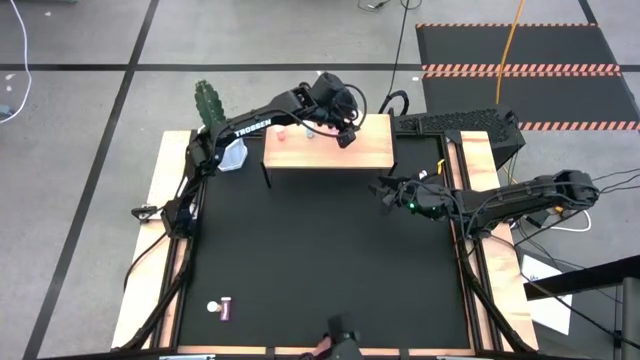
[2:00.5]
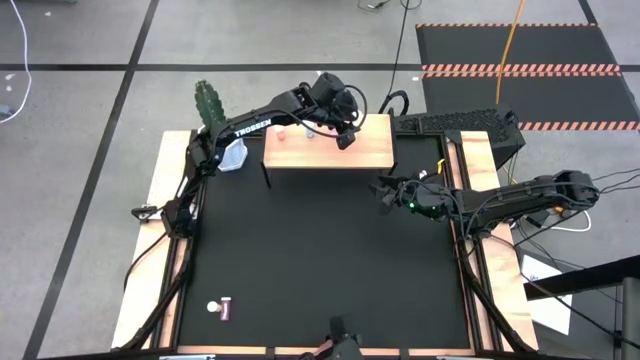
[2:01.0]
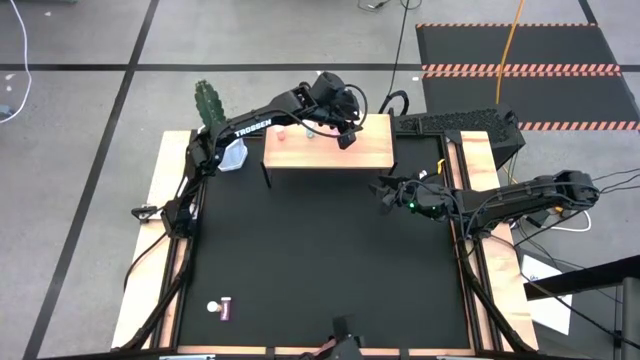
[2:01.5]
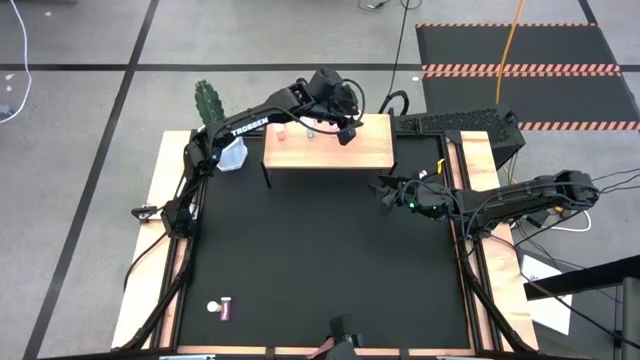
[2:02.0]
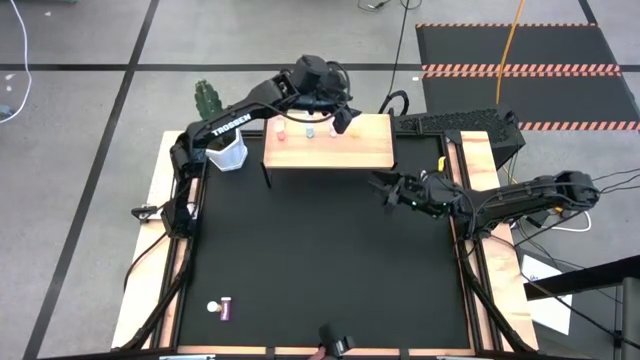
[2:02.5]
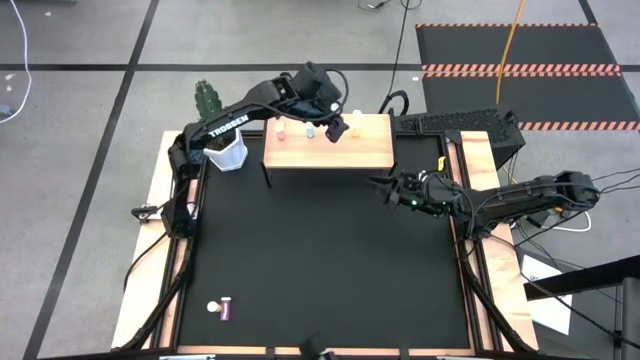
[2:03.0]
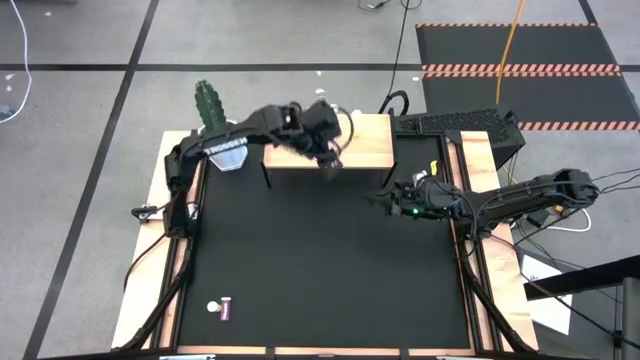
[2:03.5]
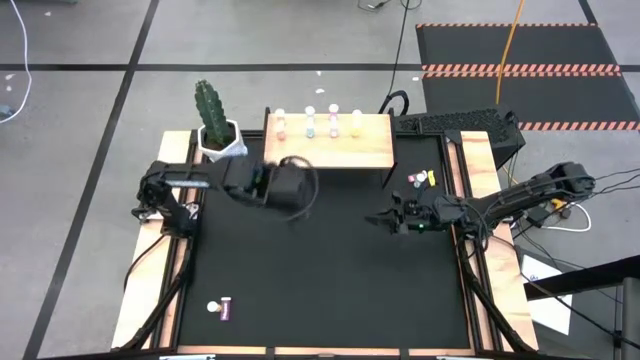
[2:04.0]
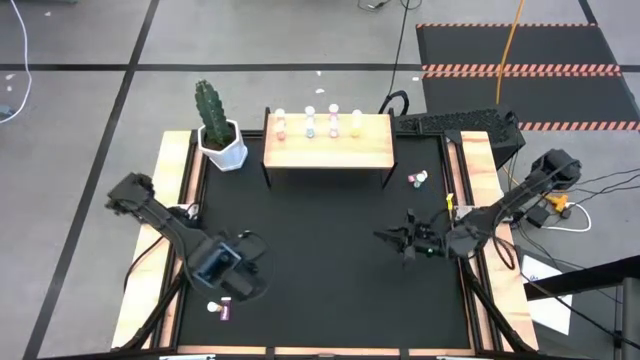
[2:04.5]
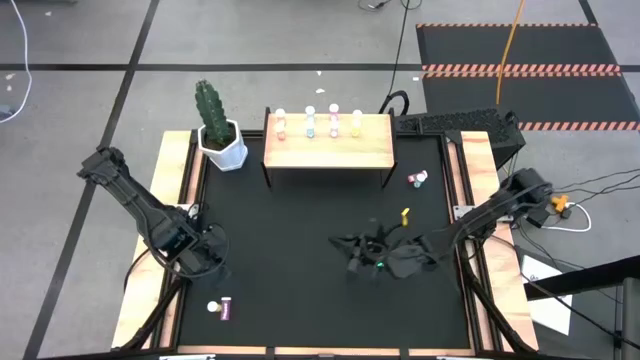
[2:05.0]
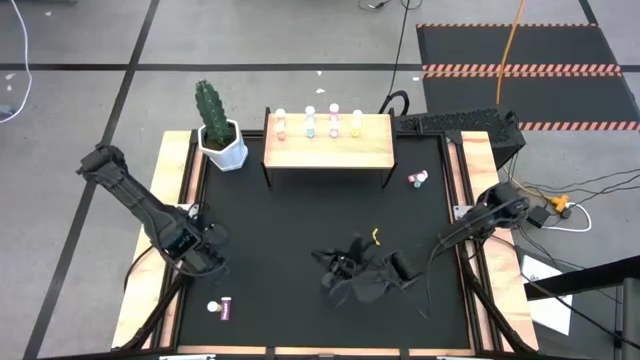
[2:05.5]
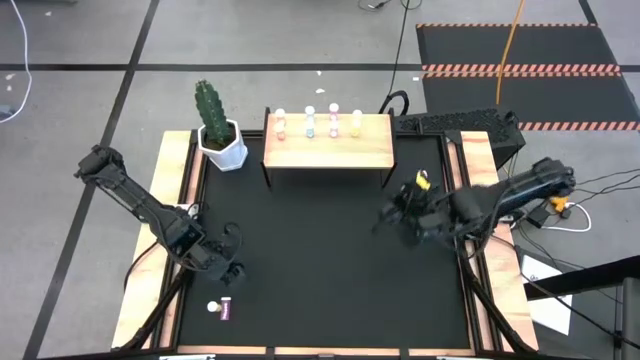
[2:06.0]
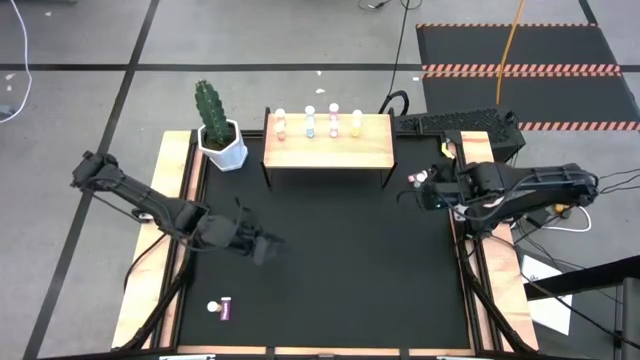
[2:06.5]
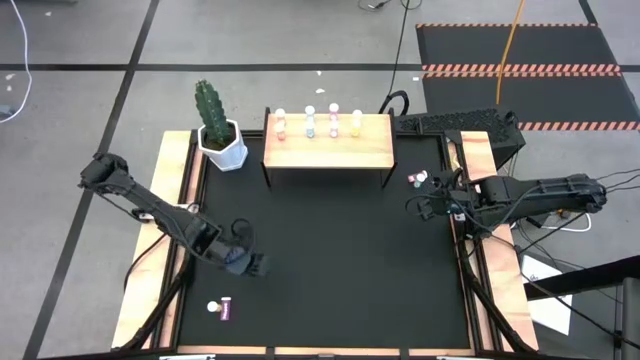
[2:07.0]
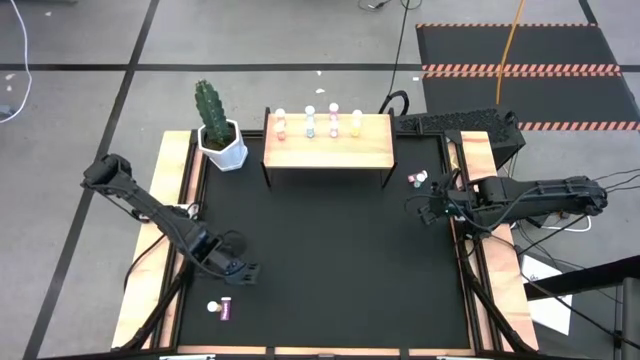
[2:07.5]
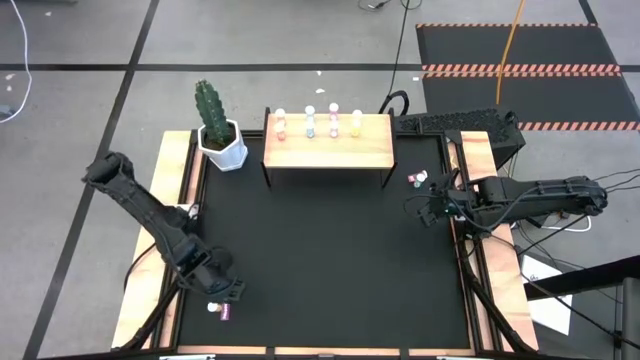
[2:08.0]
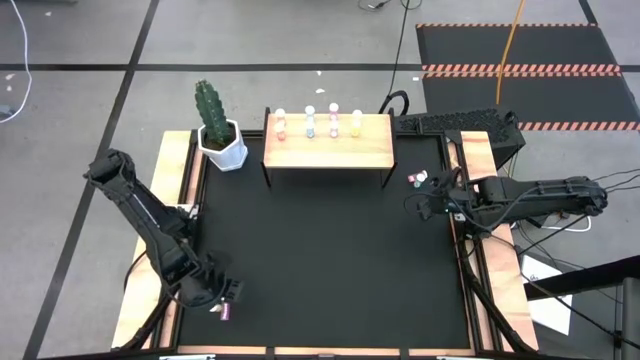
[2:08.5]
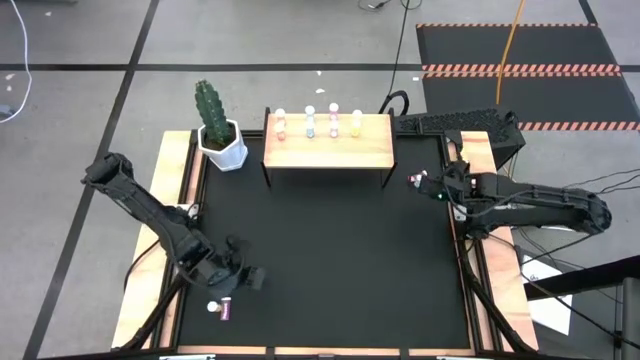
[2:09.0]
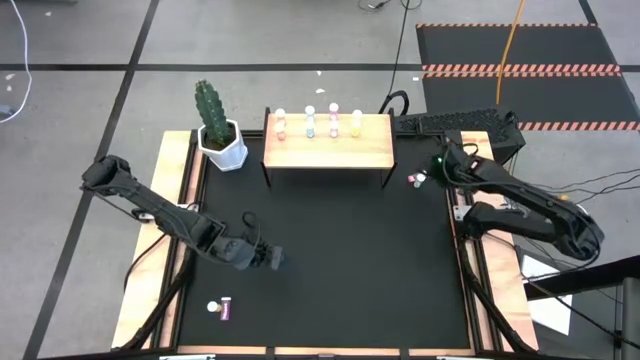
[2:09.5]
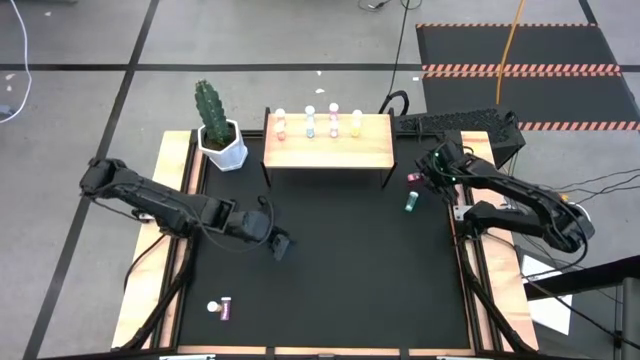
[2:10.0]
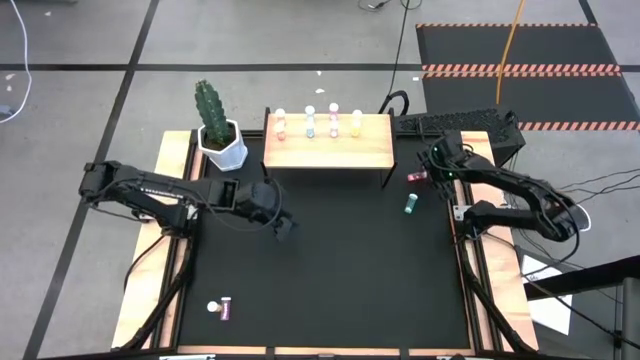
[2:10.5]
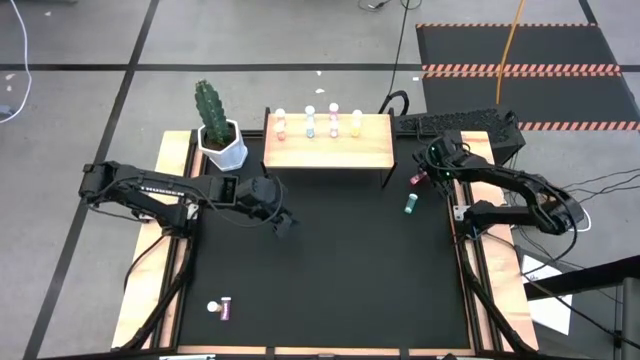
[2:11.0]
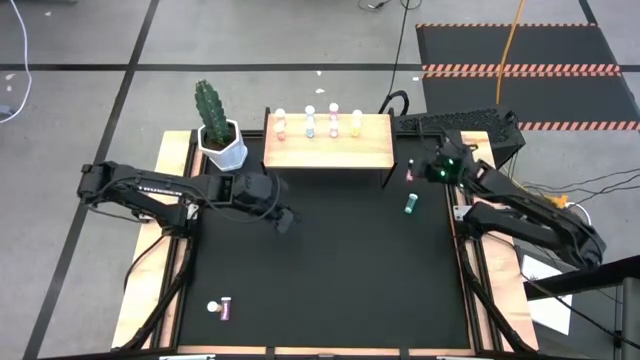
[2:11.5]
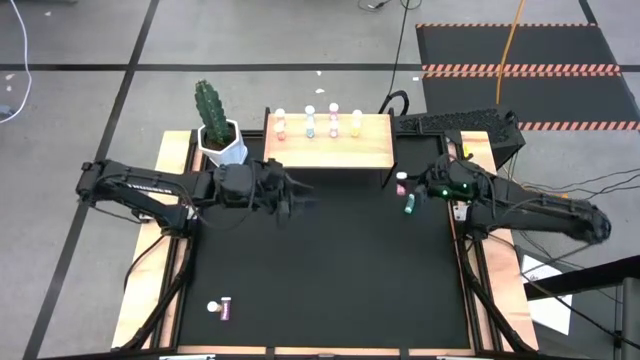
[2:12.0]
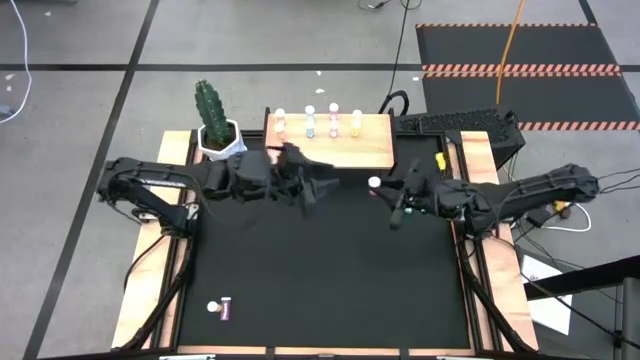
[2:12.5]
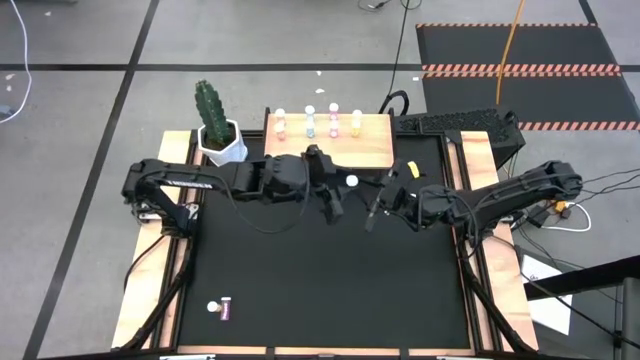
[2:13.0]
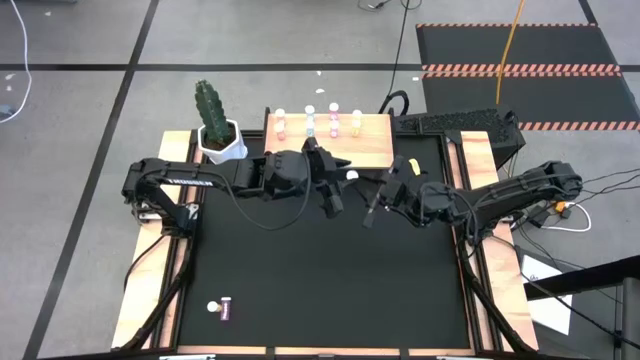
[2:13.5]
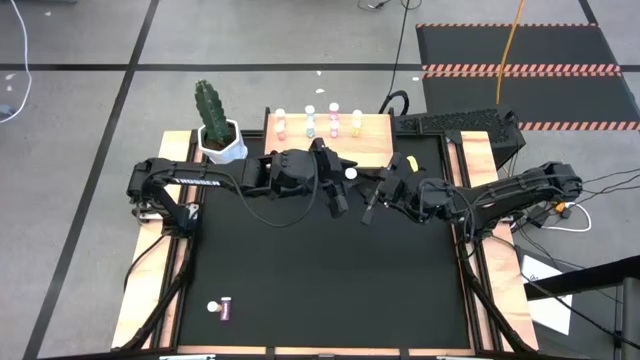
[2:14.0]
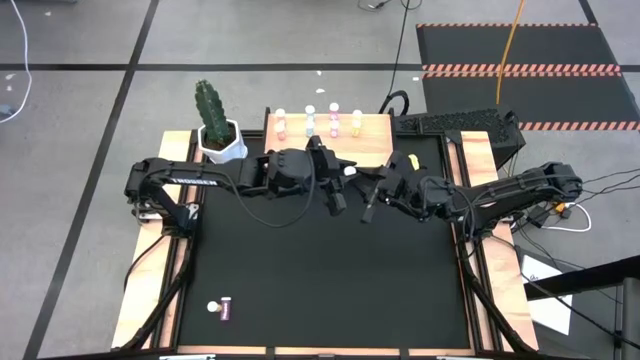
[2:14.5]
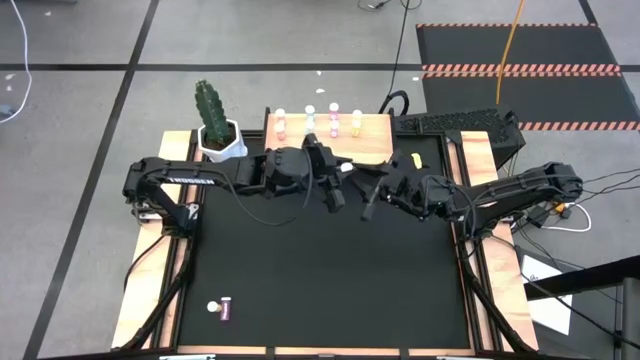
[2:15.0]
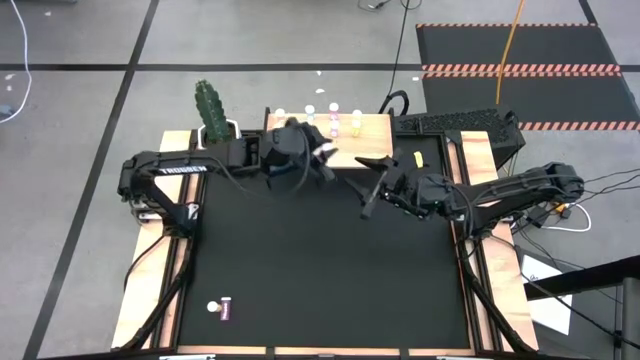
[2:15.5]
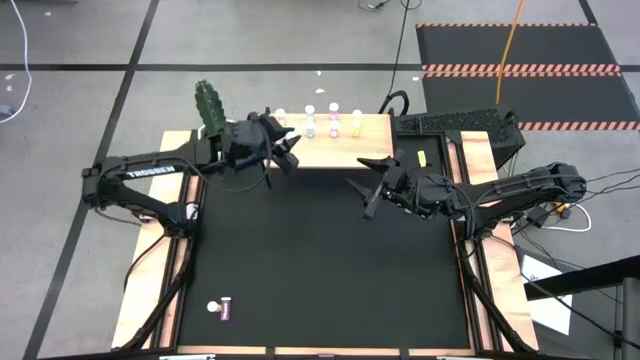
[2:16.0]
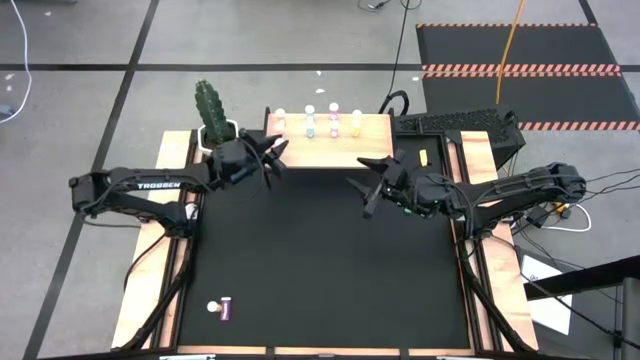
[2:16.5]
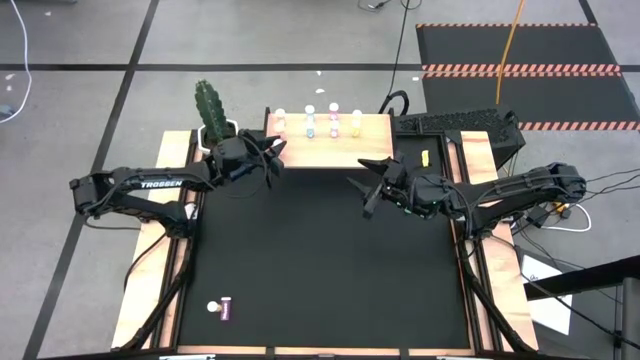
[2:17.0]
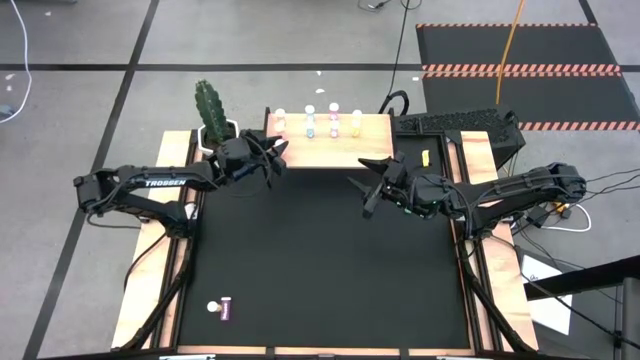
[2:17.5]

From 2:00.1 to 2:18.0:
Task: Pick and place medicine bottles onto shelf by color
Put the orange pill bottle aligned with the other orange pill bottles on the shelf

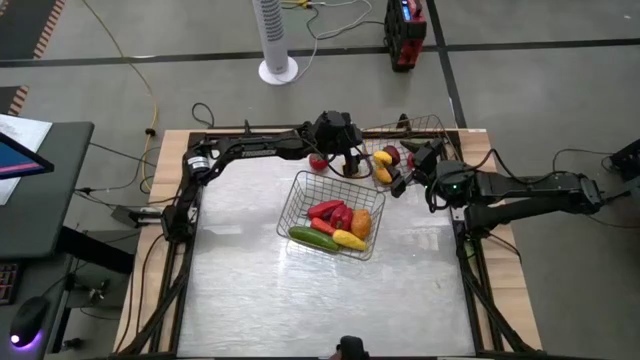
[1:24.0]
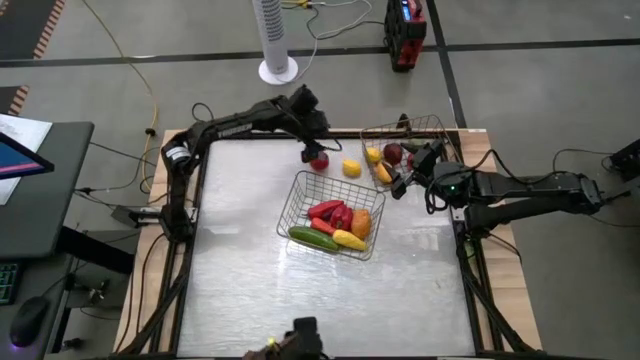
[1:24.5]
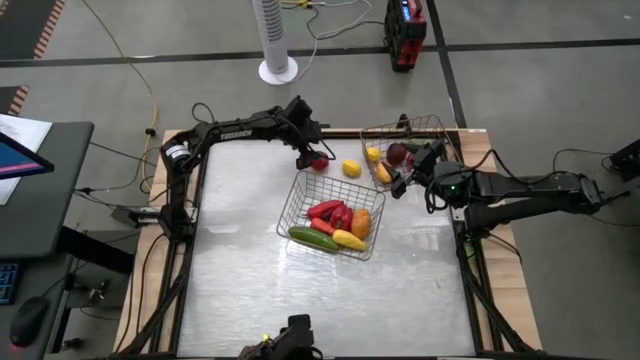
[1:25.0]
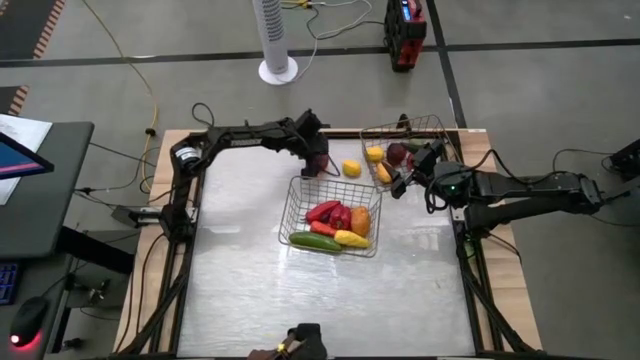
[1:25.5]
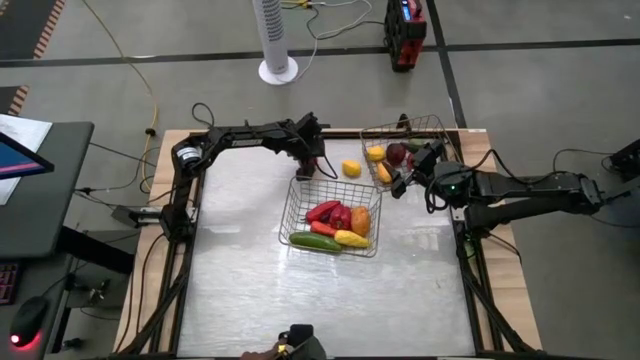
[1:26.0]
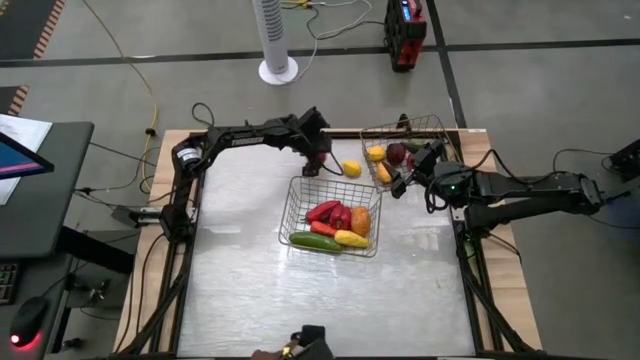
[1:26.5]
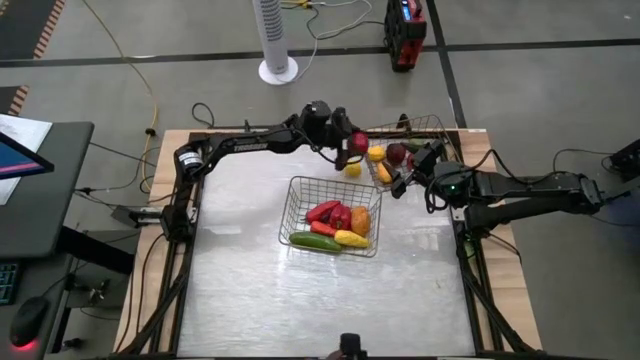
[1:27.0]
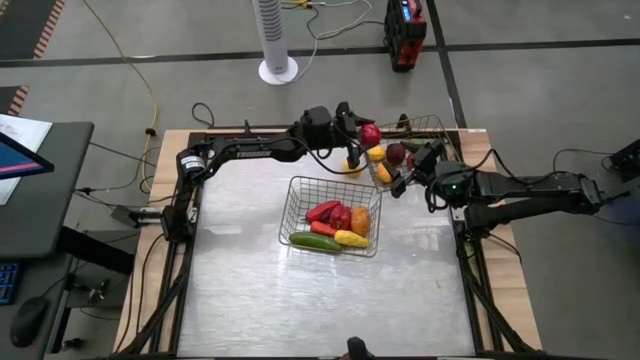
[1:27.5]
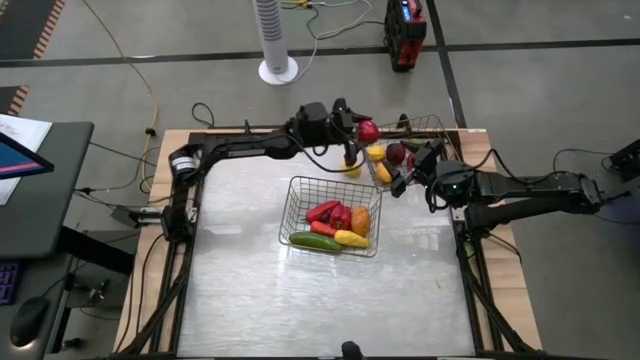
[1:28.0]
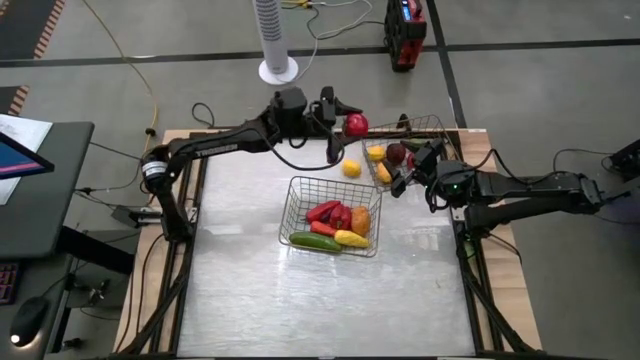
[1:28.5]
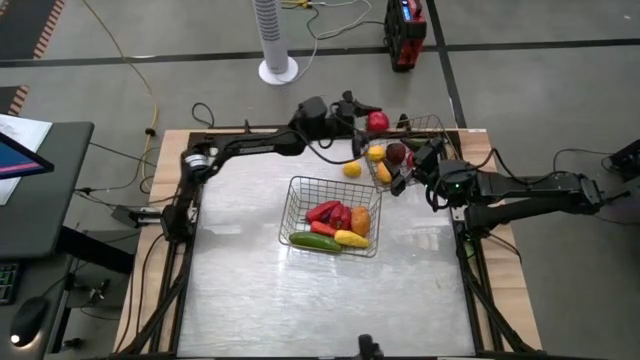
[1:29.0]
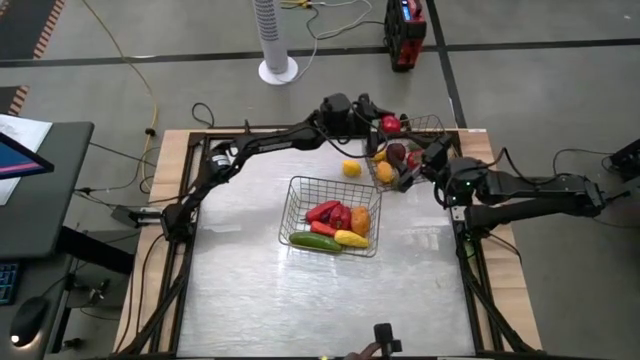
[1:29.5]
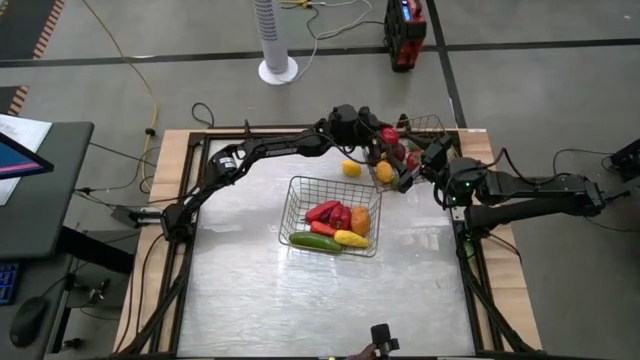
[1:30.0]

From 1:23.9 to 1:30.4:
Task: Sort produce into baskets
Put the red tomato into the right wire basket
